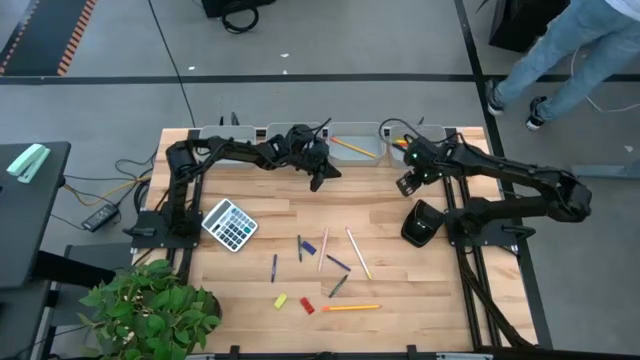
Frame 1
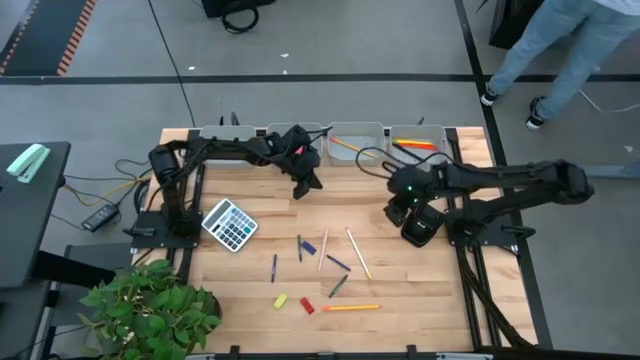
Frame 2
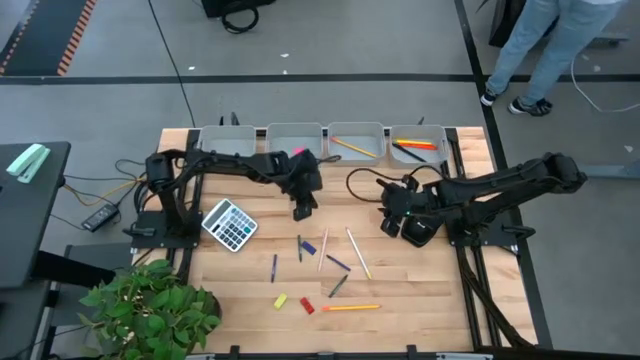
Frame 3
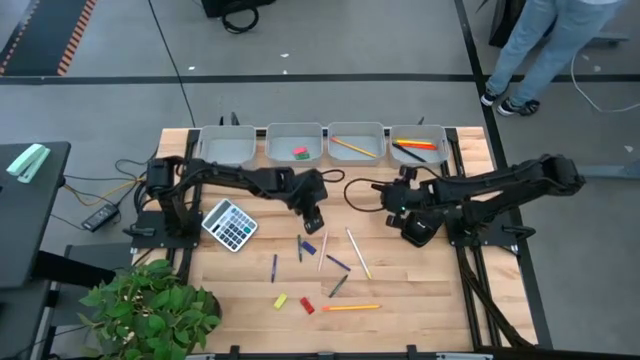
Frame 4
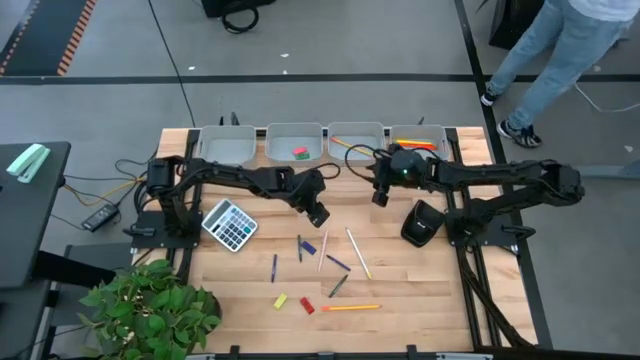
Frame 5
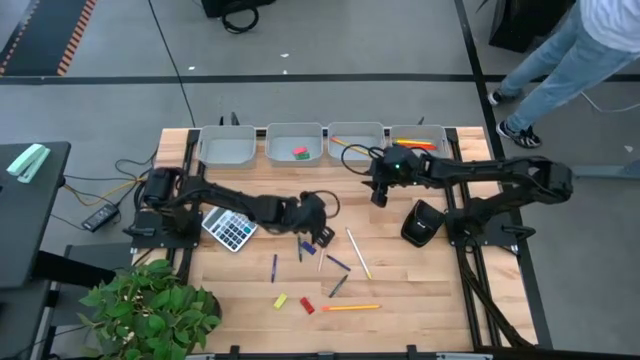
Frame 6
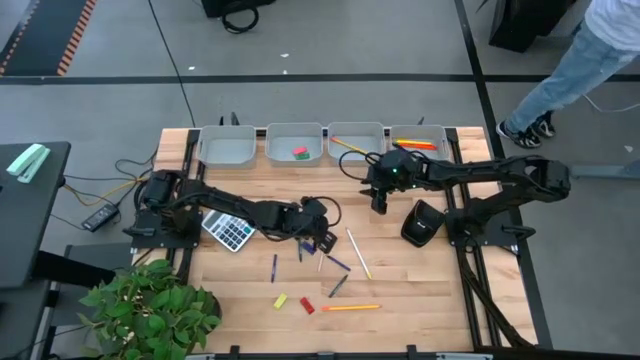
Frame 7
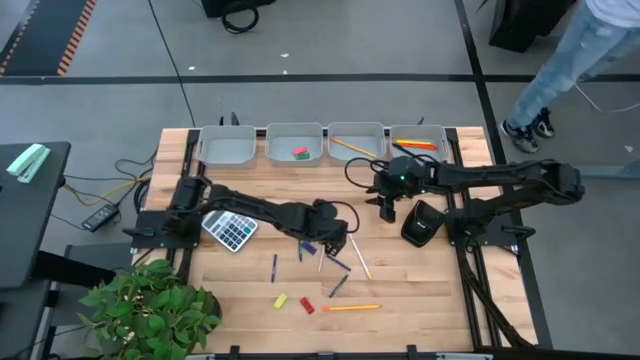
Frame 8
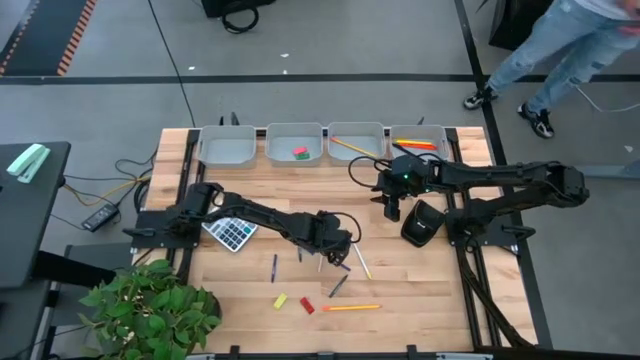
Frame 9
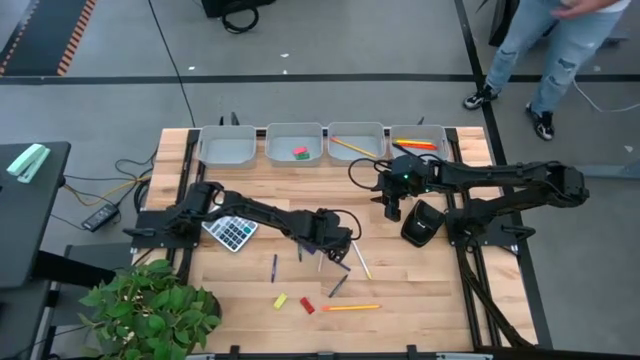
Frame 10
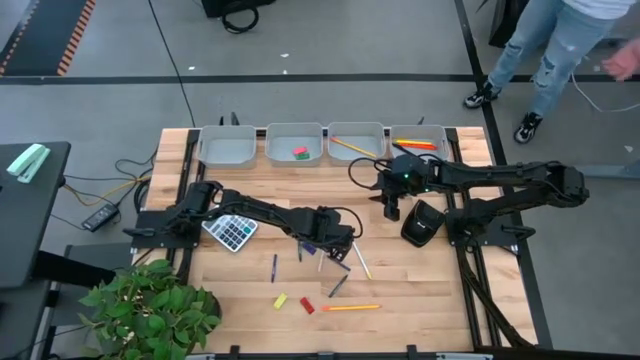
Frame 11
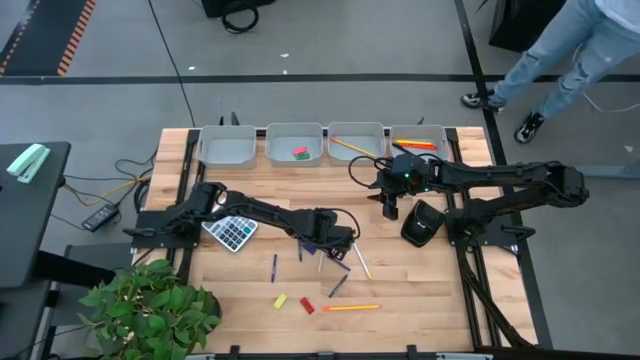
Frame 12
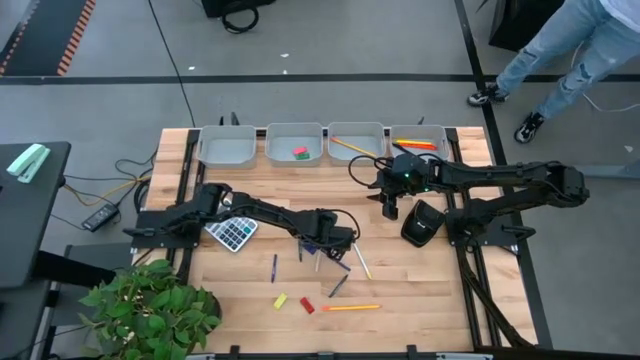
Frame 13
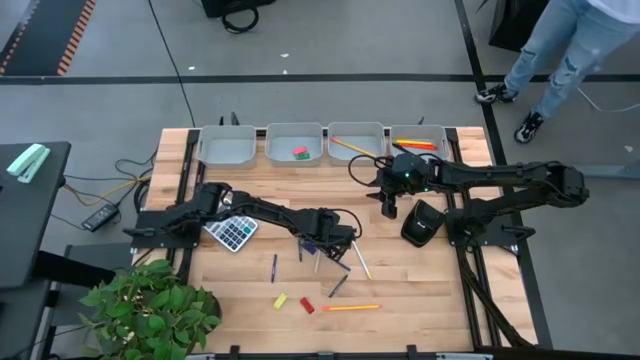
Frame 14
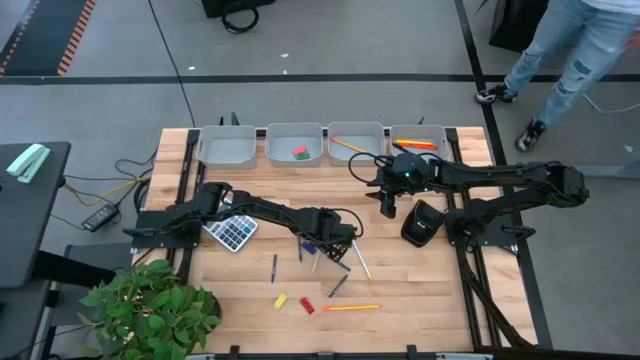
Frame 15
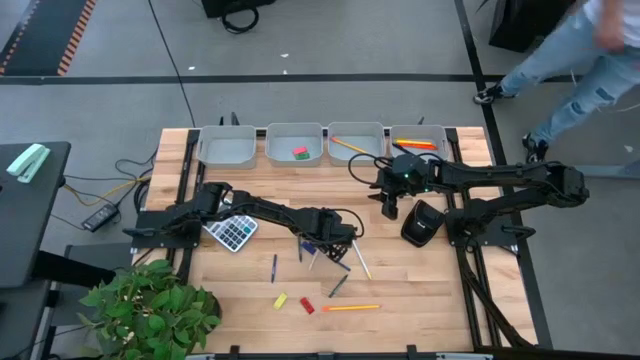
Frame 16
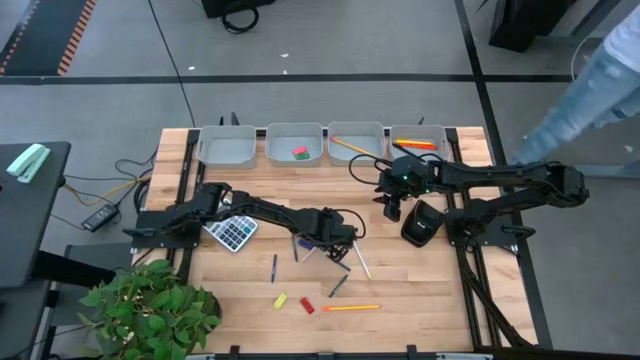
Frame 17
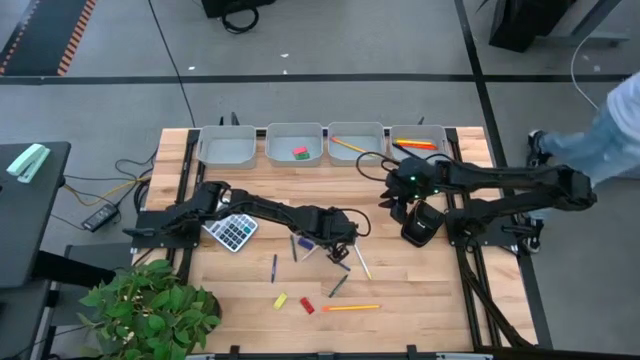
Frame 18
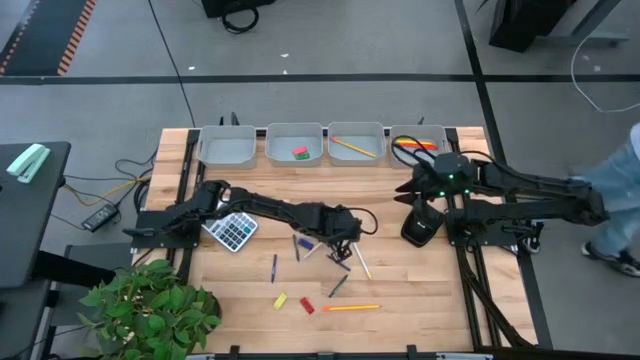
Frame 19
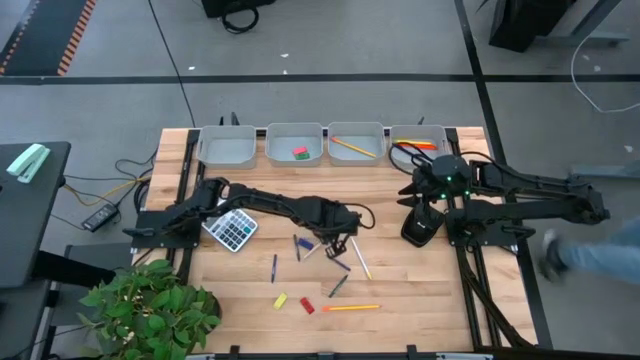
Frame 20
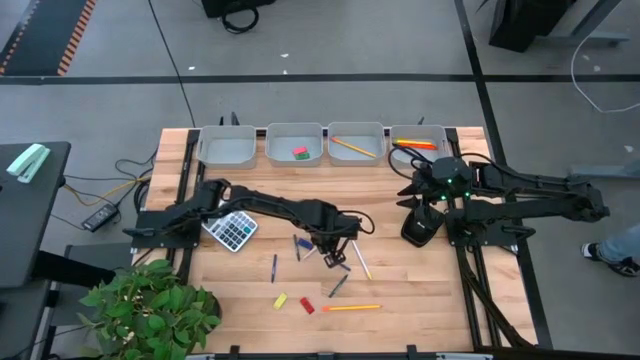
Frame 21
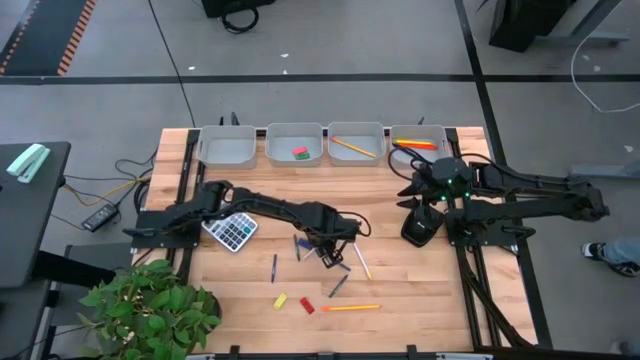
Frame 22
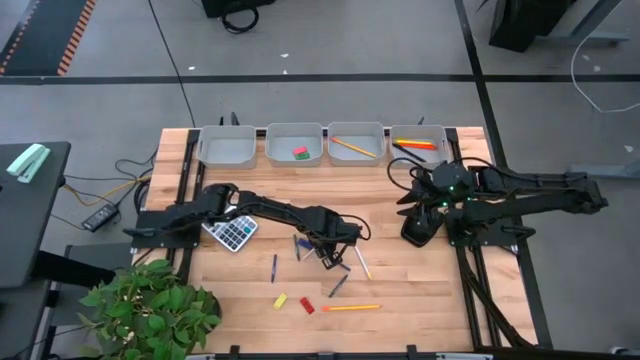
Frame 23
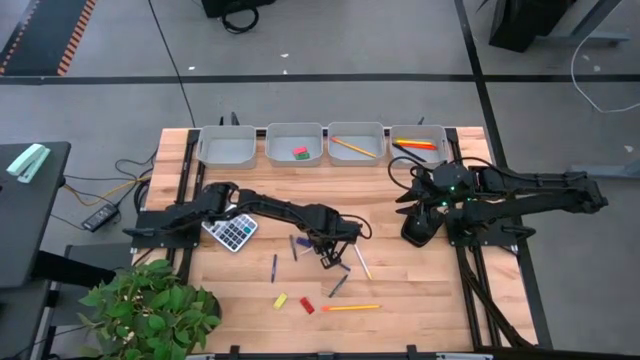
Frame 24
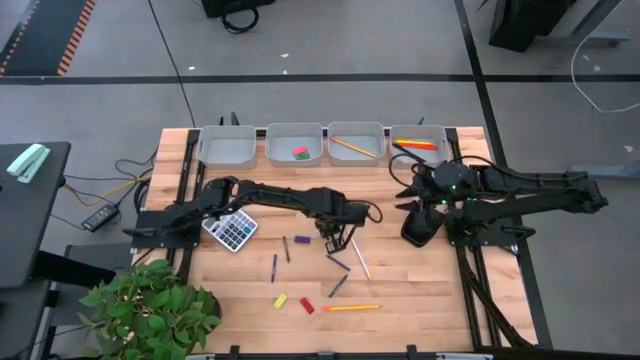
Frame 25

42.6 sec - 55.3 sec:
Task: Sort crayons/erasers/pens/pencils in bins
Put the pink pen into the gray bin

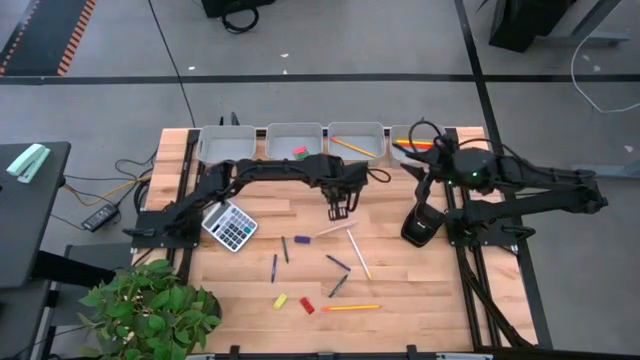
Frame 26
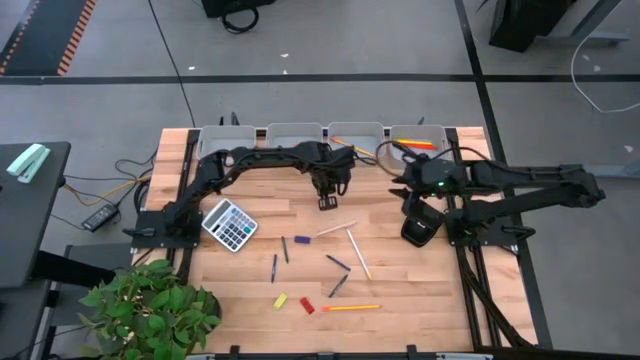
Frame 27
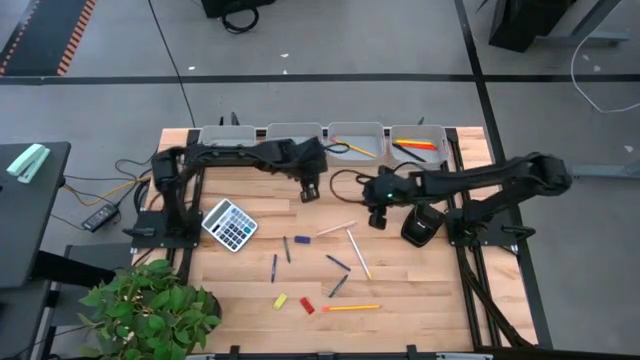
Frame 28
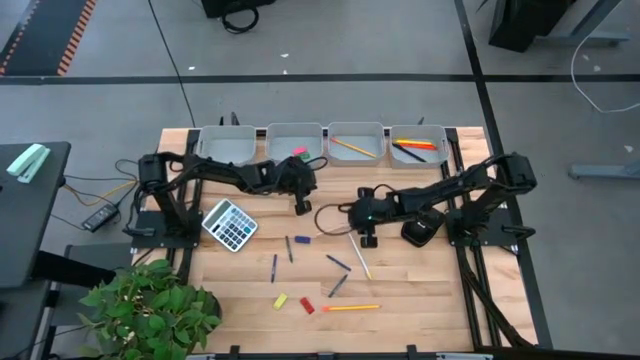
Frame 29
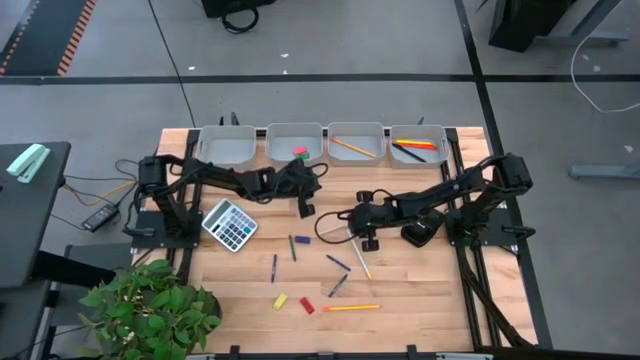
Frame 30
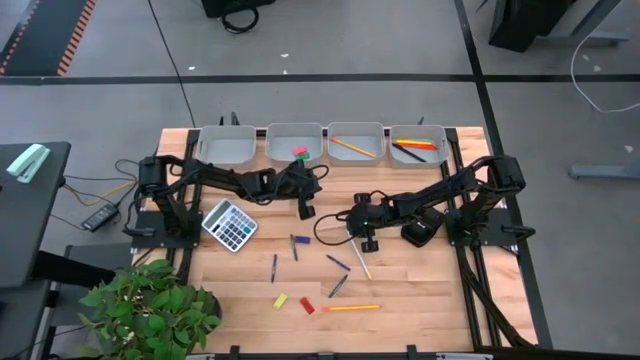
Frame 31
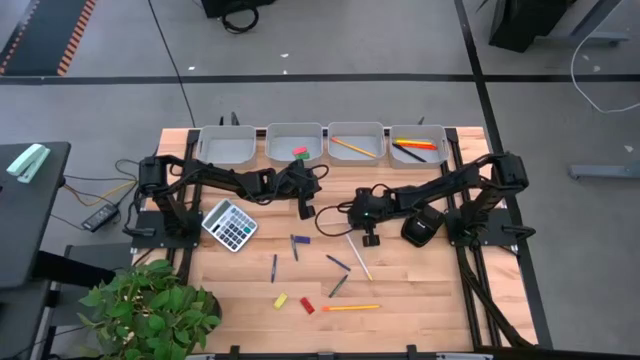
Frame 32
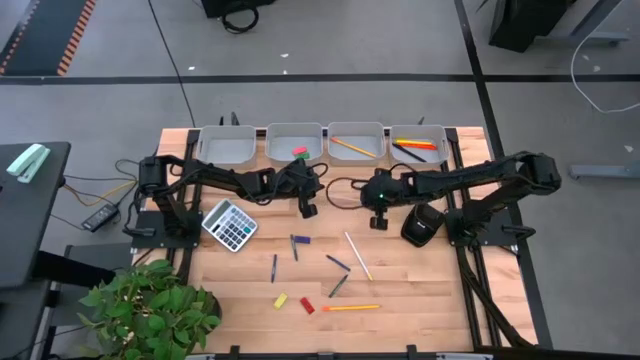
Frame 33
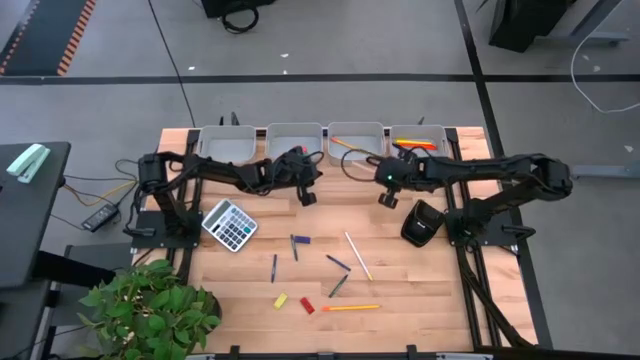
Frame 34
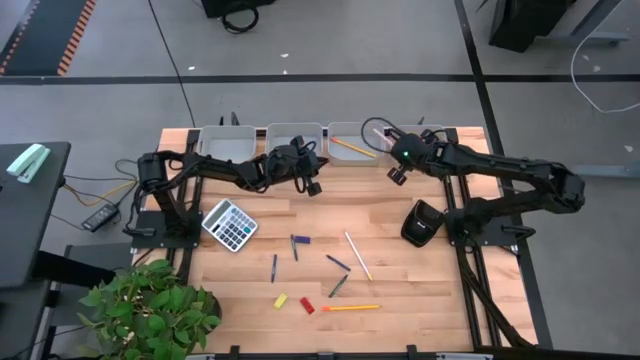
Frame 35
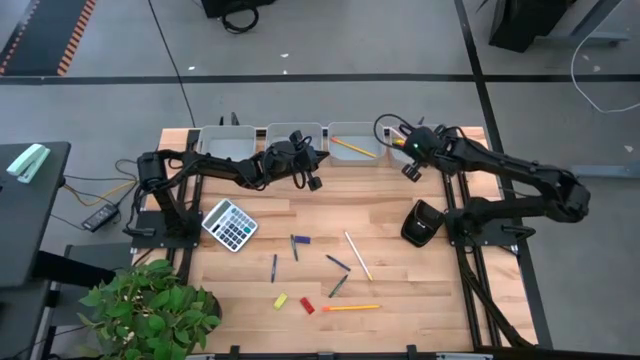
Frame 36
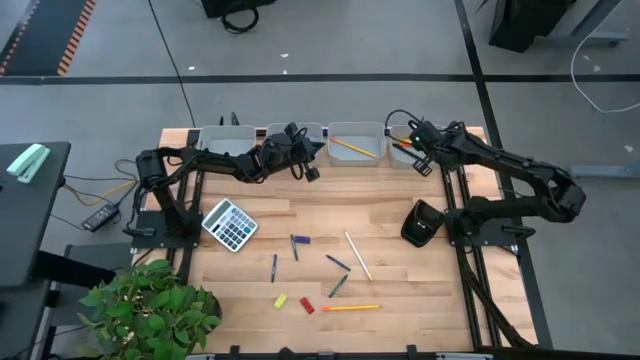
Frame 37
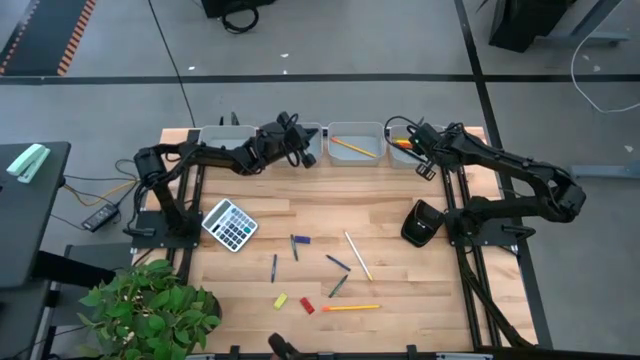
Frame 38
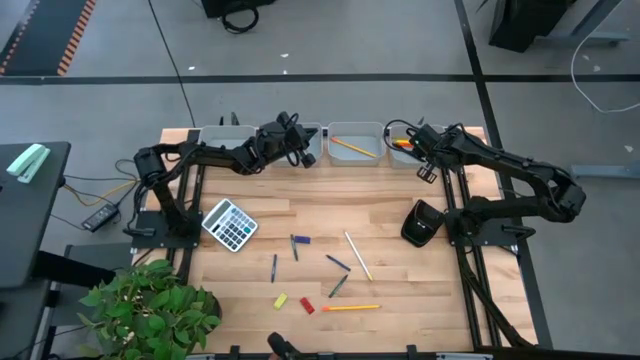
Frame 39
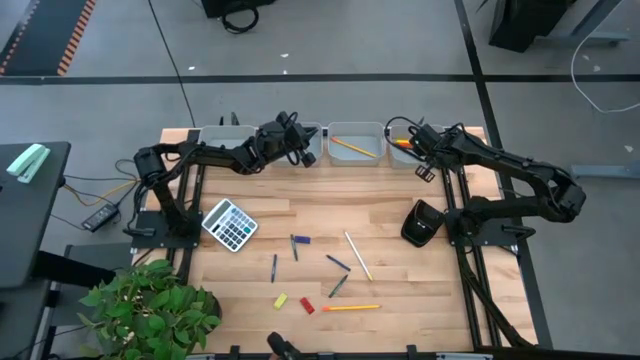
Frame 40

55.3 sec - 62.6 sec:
Put the pink pen into the gray bin

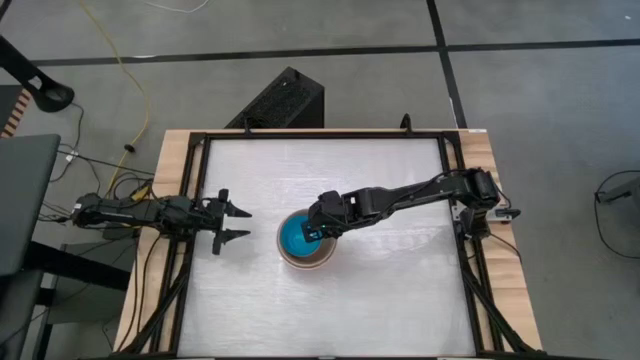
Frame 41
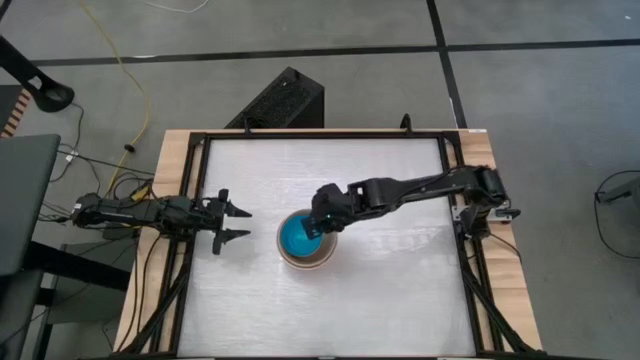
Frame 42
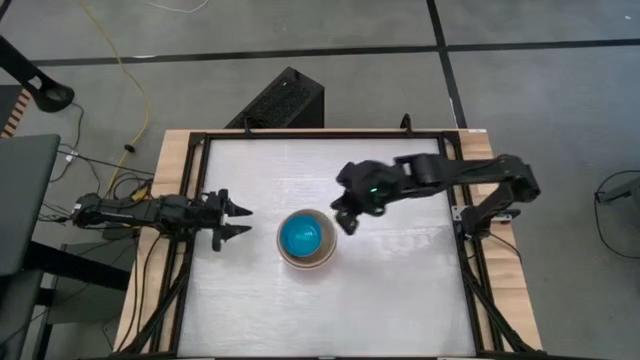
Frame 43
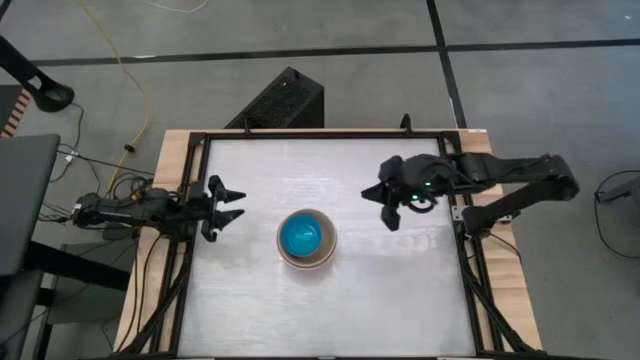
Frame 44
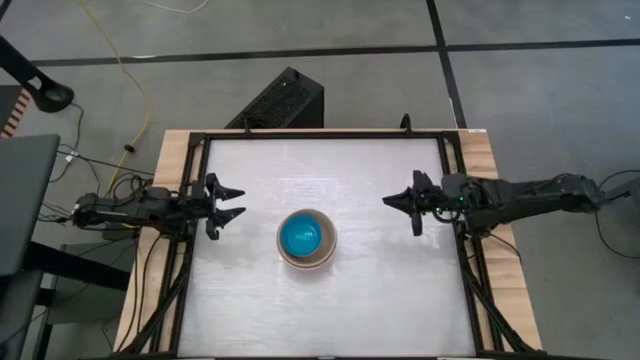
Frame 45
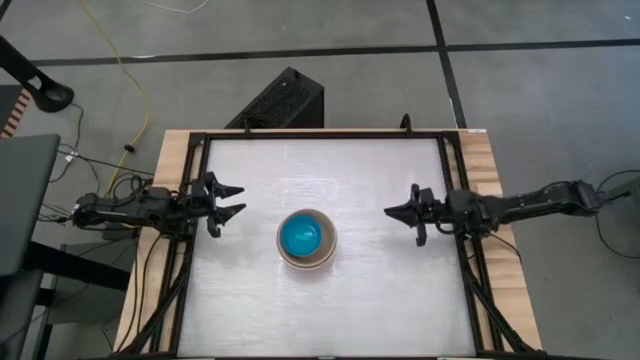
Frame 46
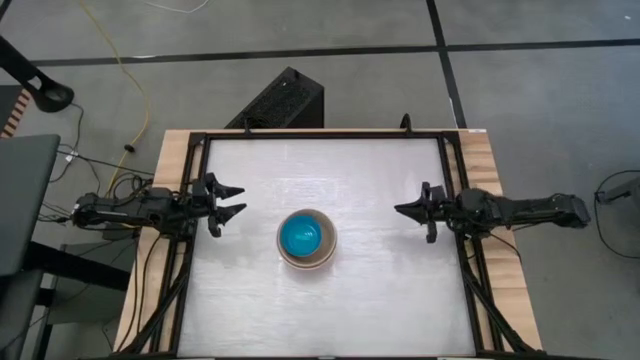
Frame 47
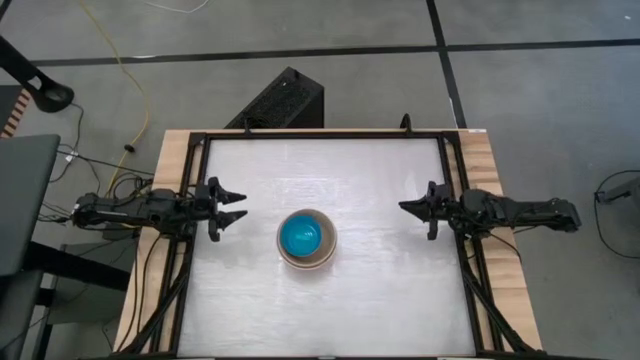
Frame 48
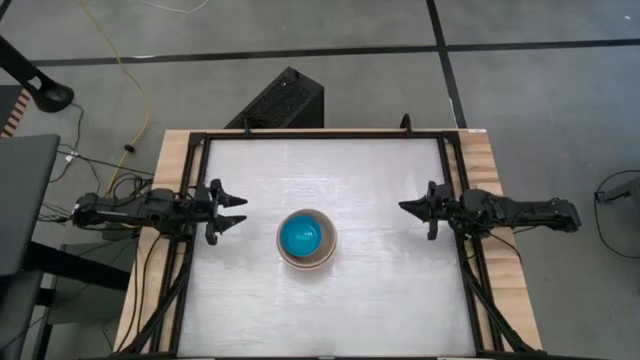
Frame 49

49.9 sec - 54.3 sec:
Task: Nest bowls inside each other by size order
Return to Home Position
